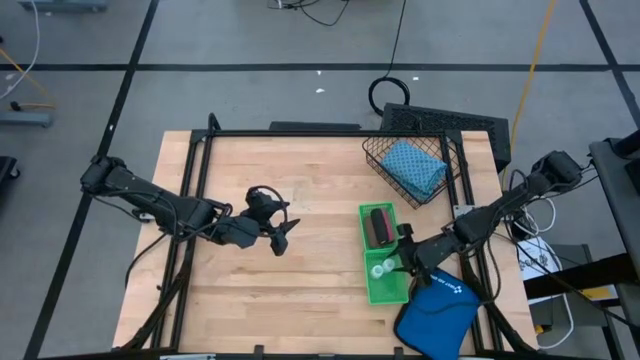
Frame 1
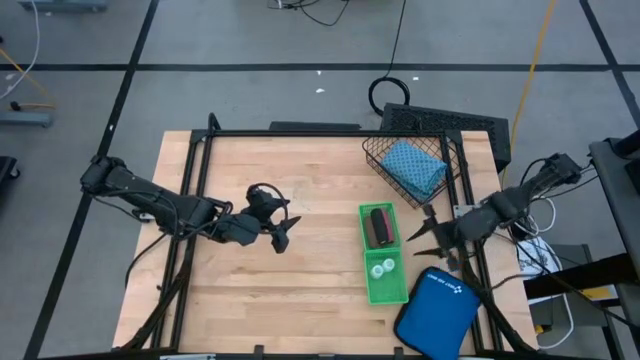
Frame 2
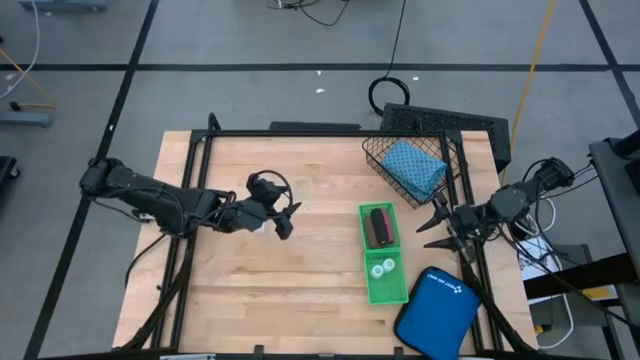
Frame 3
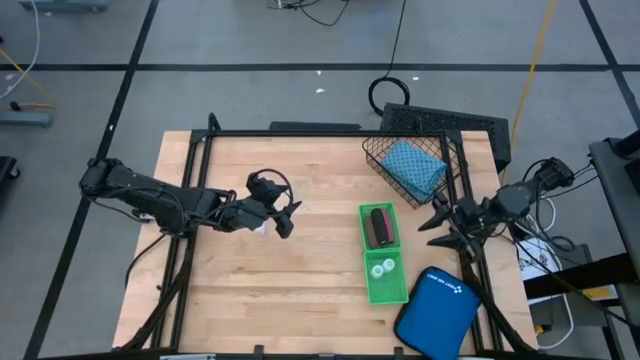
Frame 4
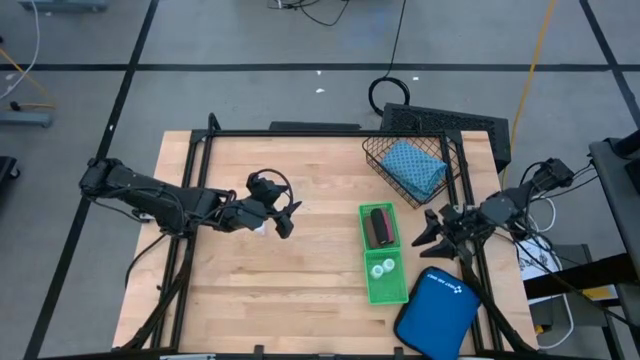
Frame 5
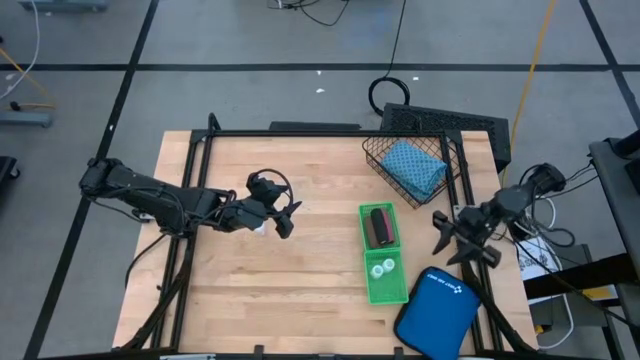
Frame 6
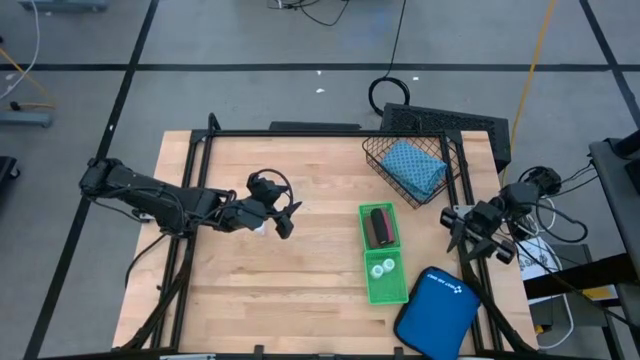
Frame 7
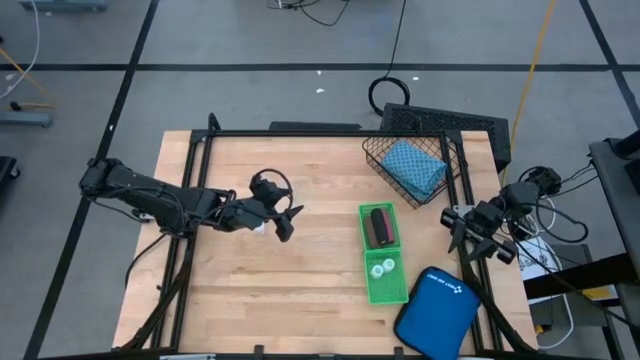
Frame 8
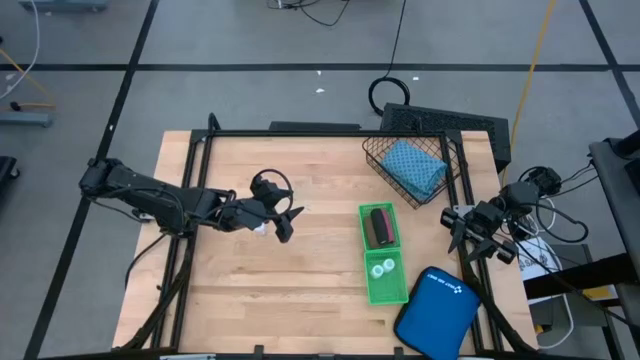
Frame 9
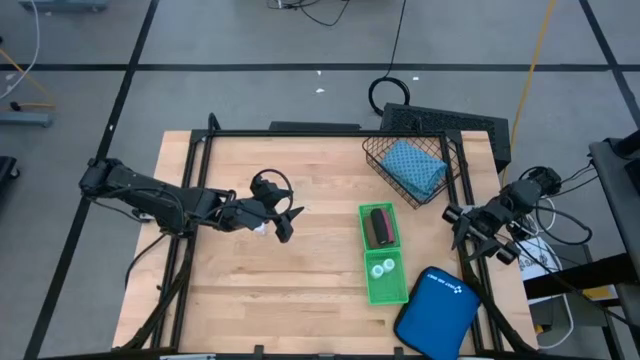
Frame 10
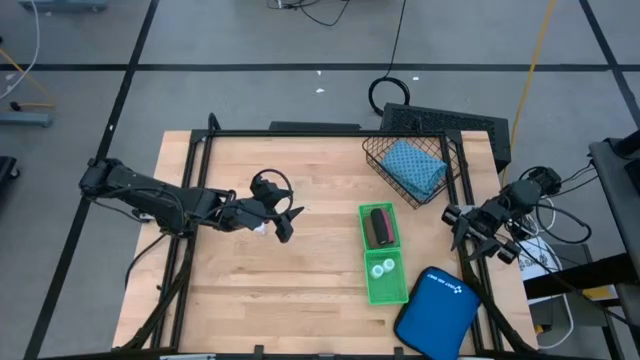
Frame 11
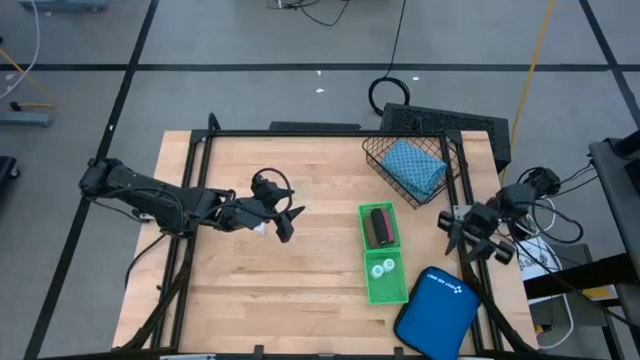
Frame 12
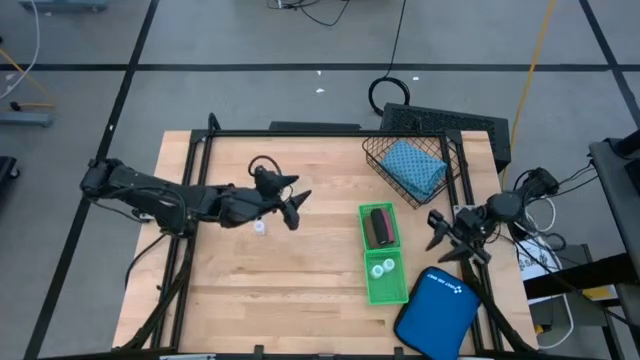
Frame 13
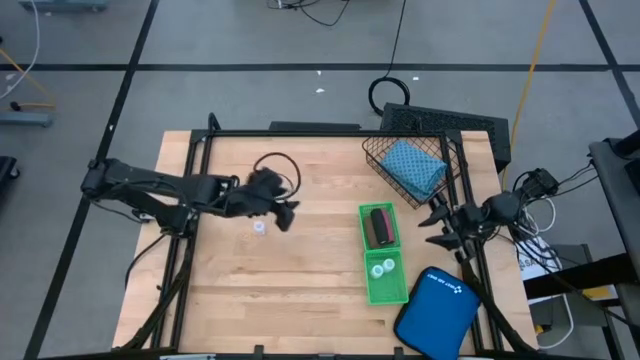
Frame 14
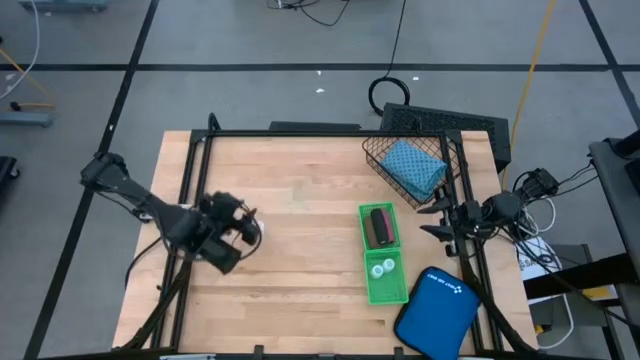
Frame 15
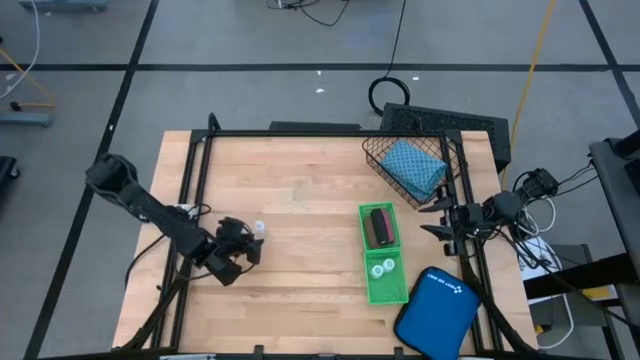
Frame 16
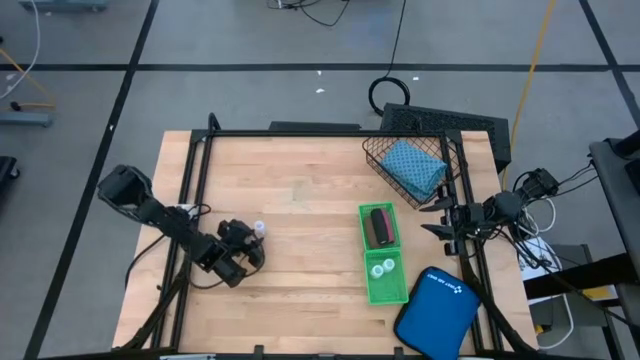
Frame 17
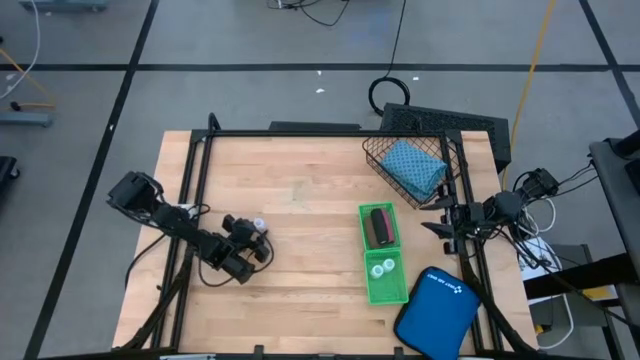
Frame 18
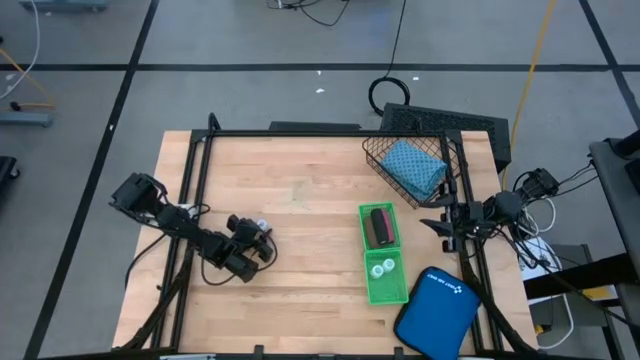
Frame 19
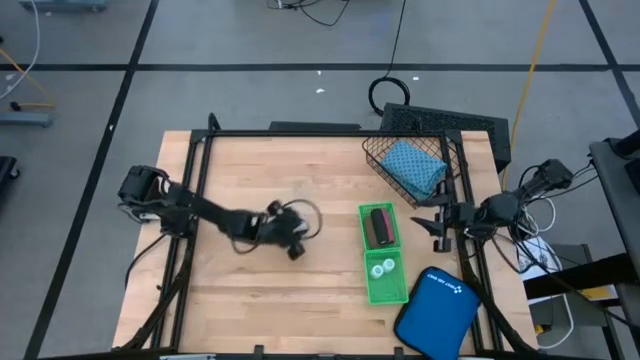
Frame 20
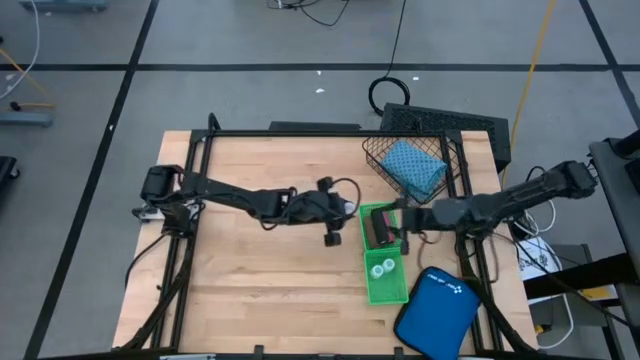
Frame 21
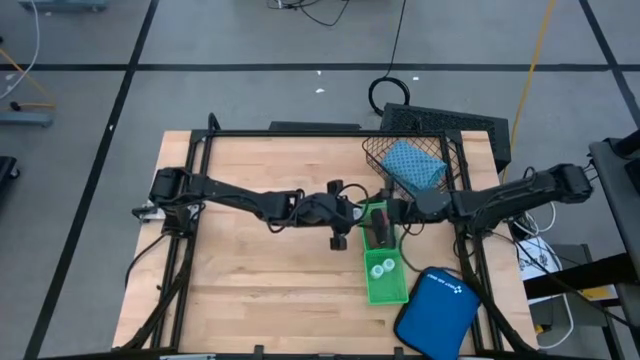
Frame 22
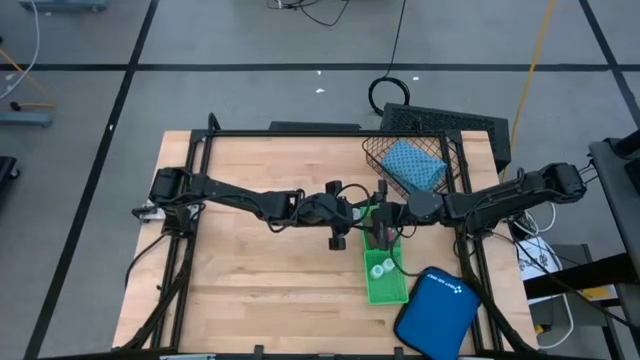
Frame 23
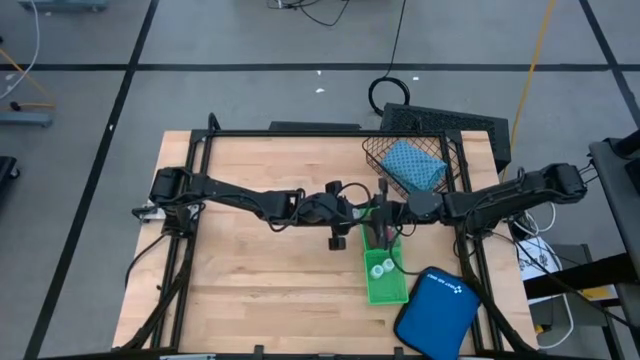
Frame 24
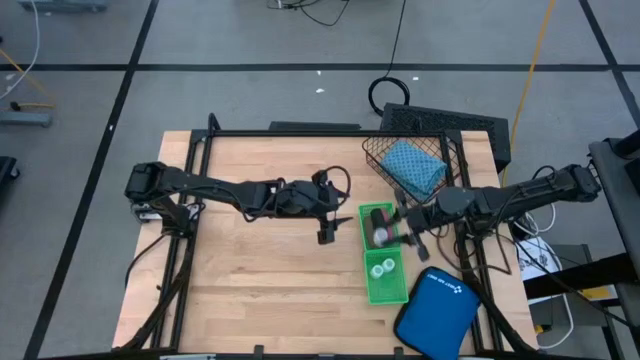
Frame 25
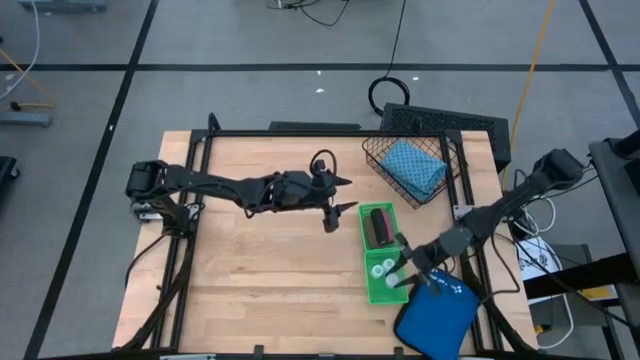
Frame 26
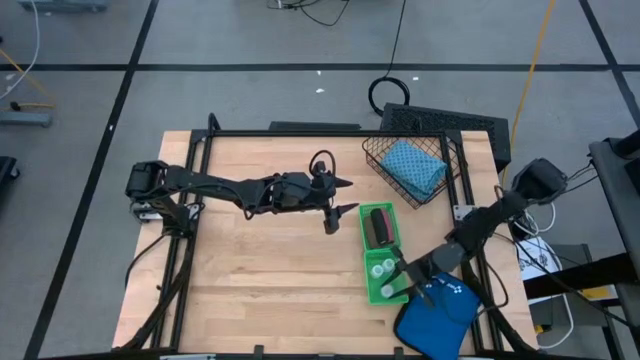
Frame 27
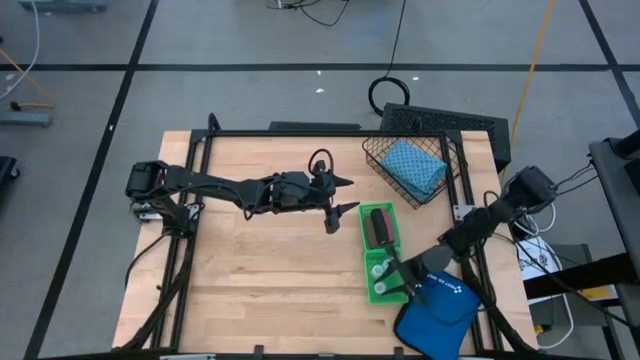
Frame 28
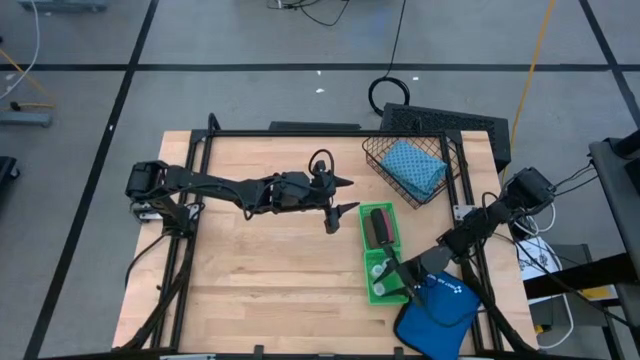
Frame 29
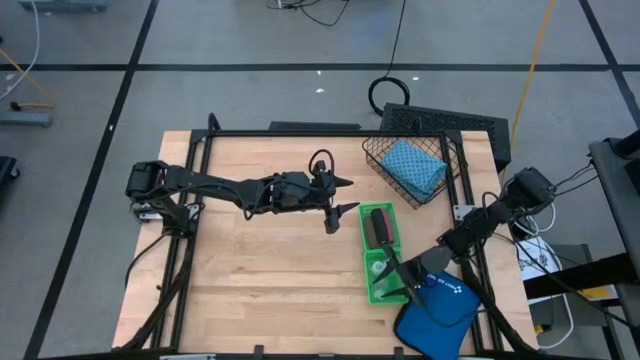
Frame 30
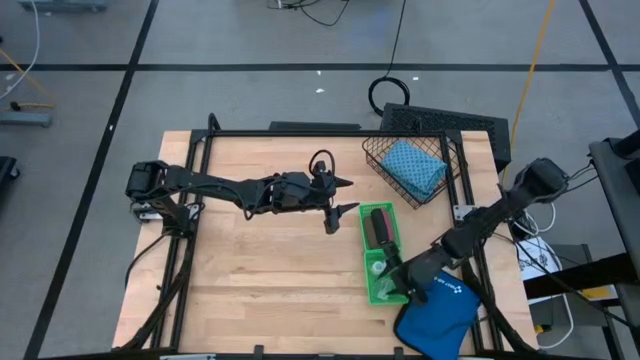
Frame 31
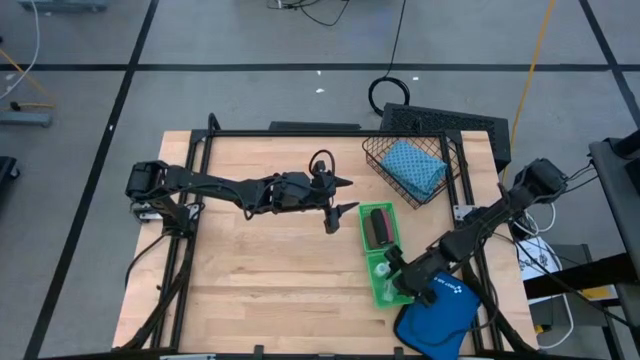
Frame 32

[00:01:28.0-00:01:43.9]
Task: Pick & Place Medicine items
Put the transparent pill bottle into the bottom green basket

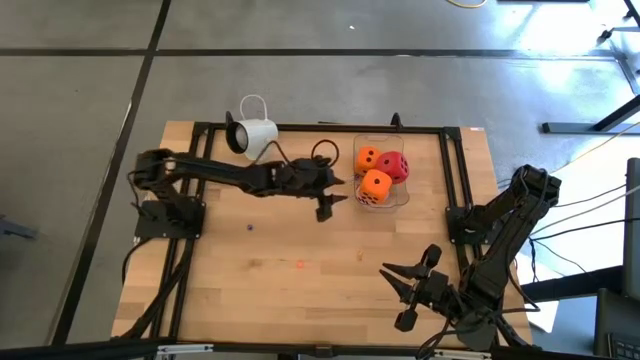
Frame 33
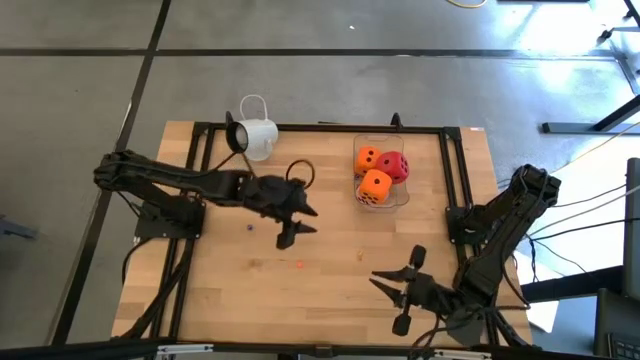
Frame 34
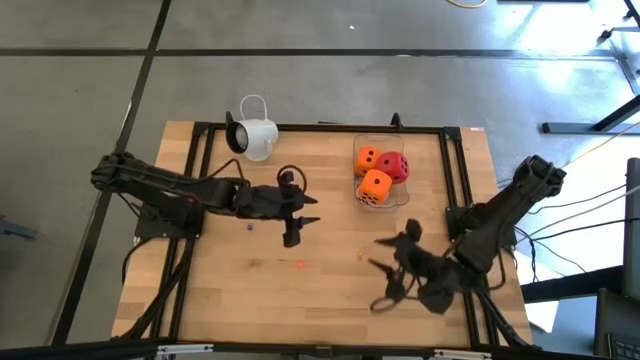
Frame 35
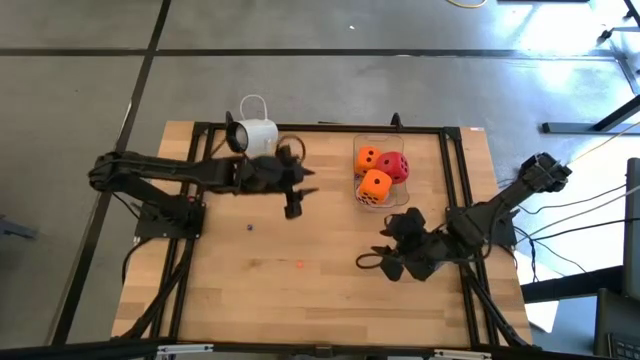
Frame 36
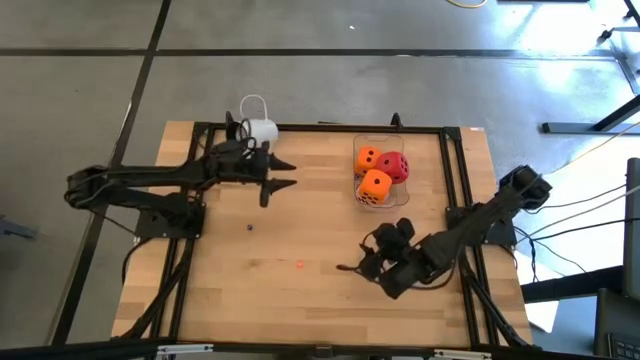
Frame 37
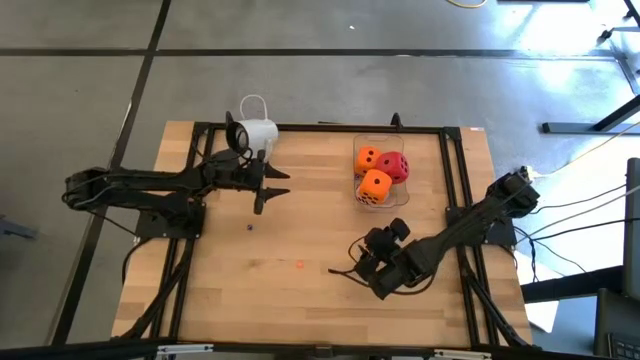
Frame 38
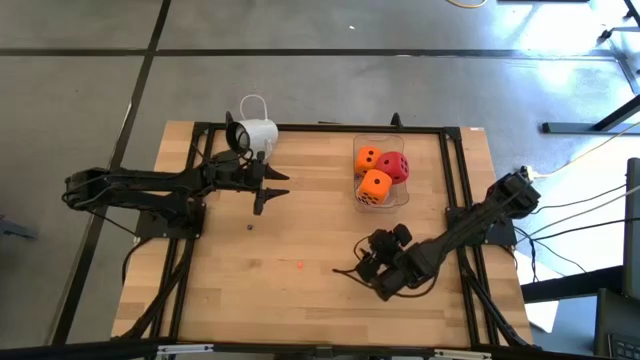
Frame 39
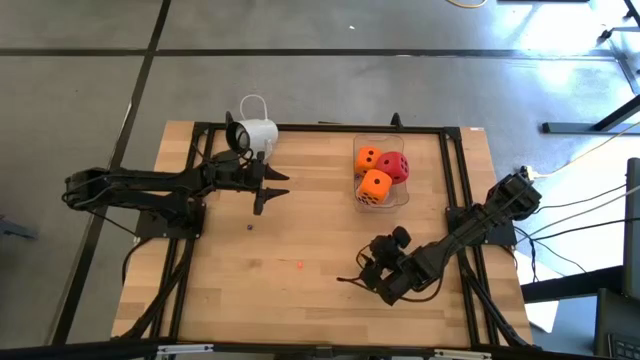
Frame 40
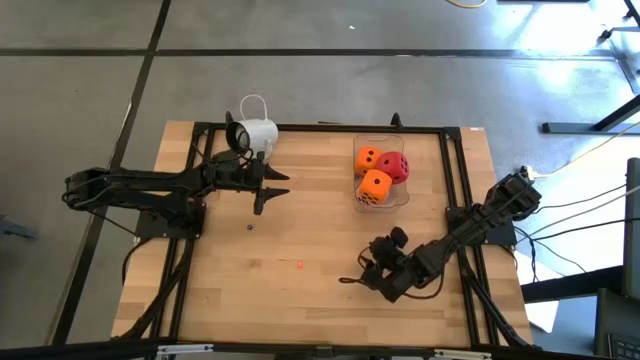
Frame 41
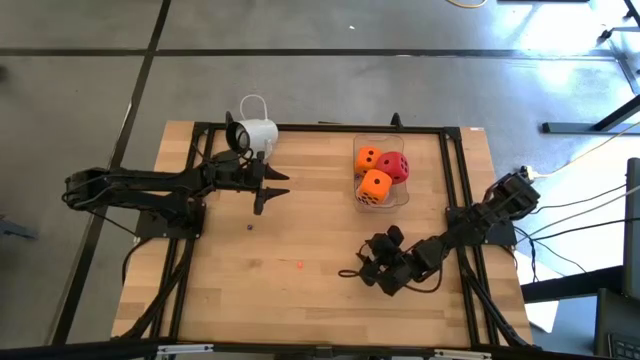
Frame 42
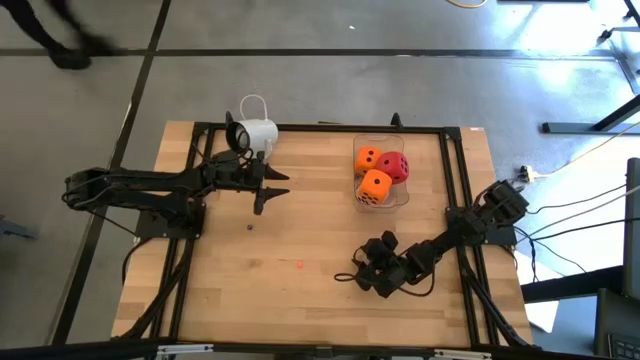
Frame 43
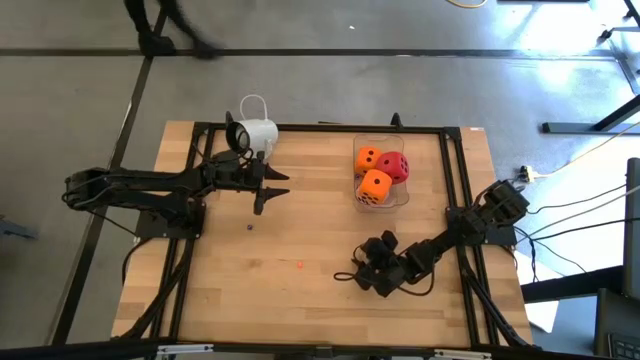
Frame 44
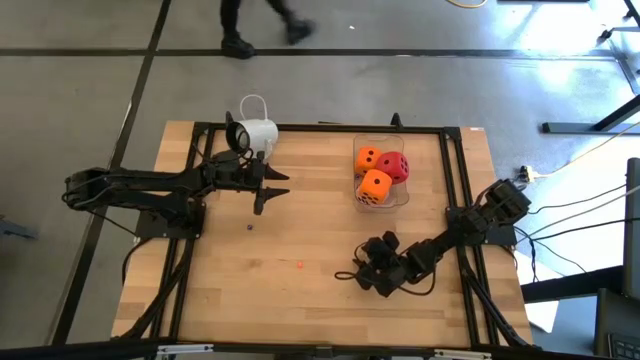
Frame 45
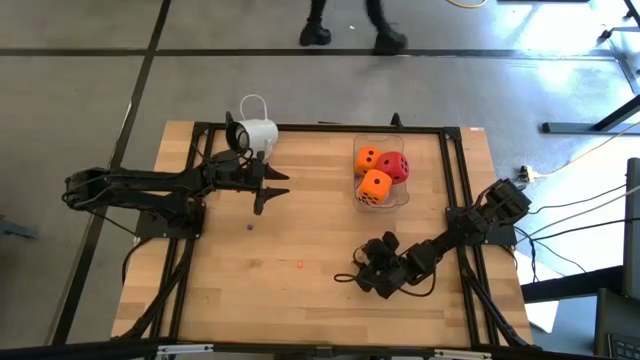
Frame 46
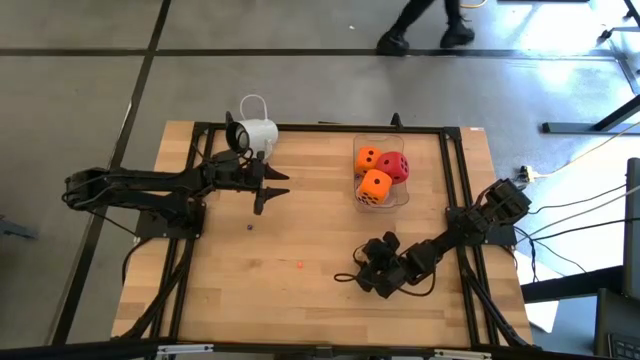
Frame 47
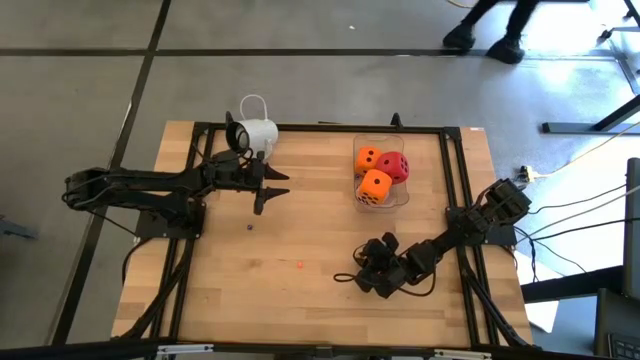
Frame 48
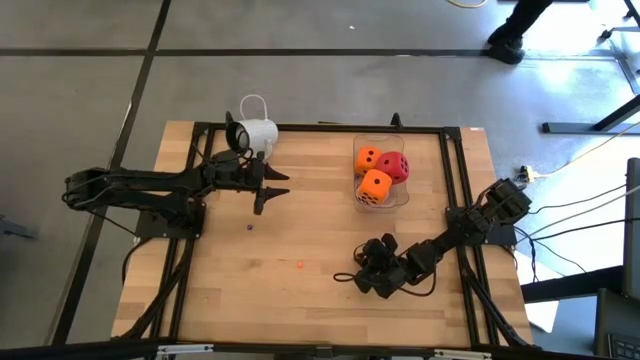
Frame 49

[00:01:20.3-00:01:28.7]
Task: Pick & Place Dice
Put the small yellow die into the transparent bin
